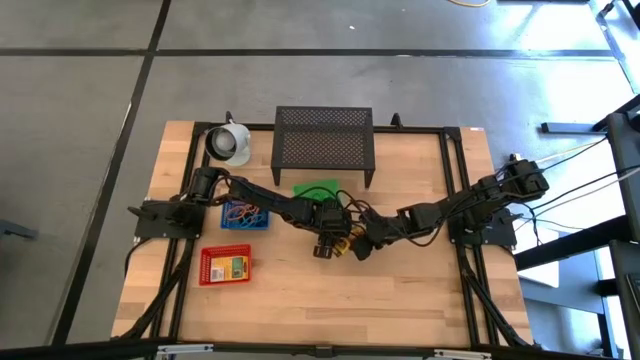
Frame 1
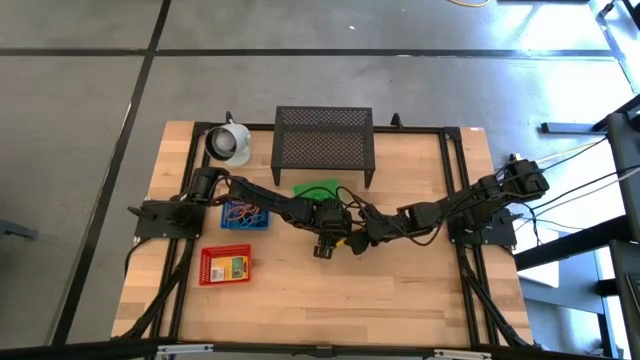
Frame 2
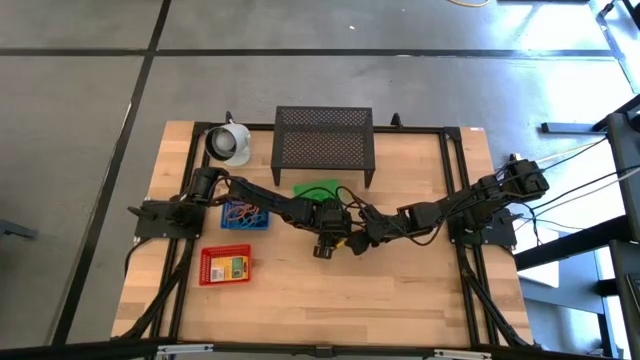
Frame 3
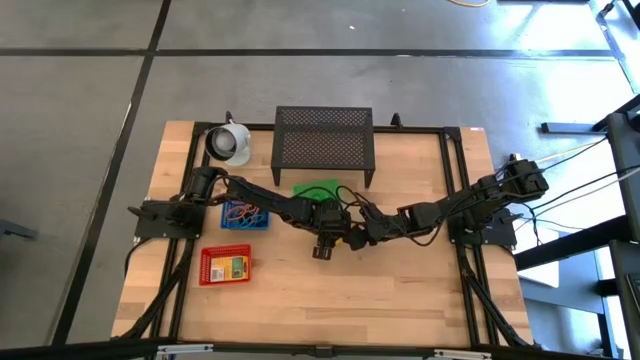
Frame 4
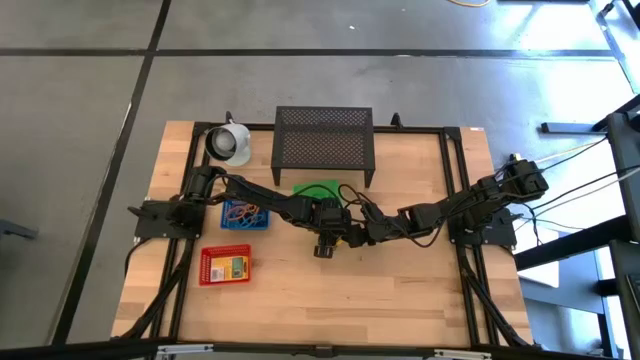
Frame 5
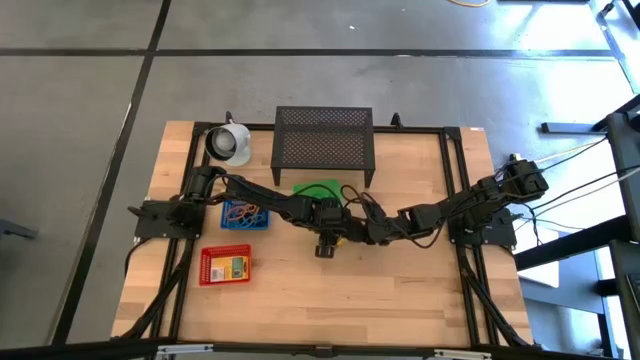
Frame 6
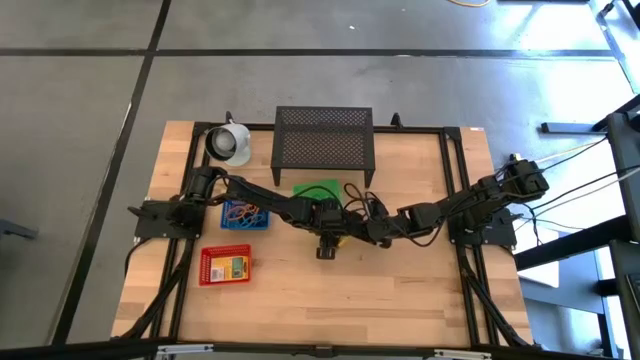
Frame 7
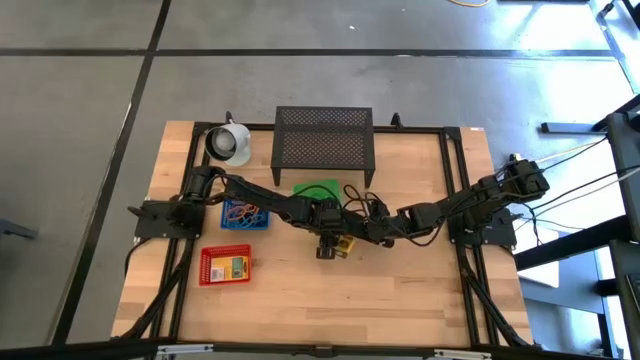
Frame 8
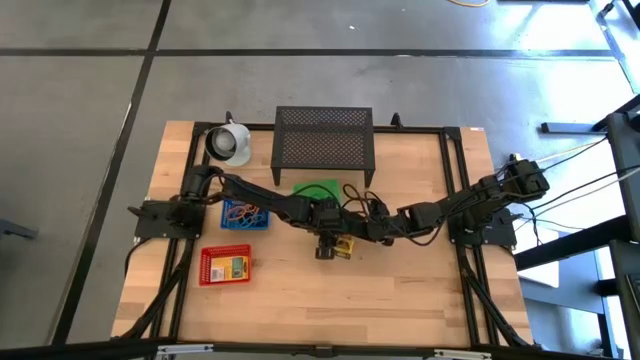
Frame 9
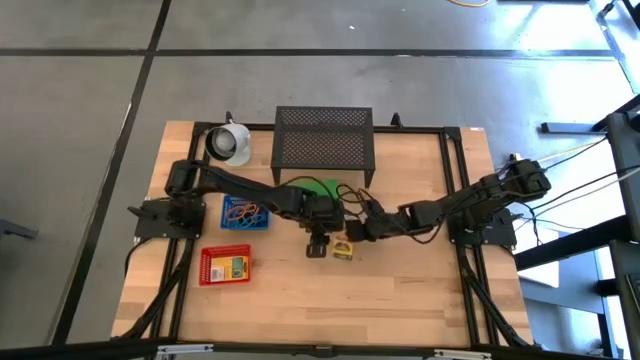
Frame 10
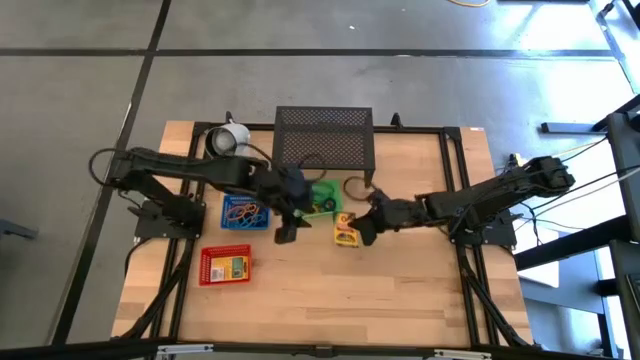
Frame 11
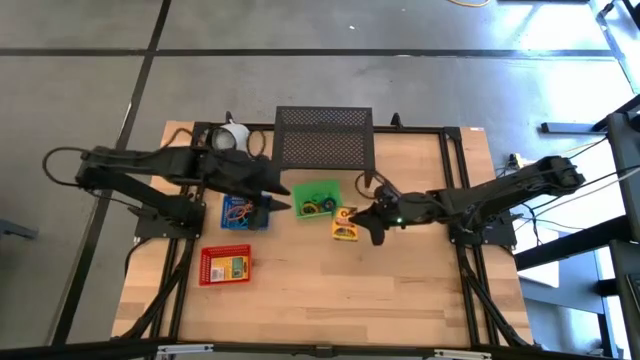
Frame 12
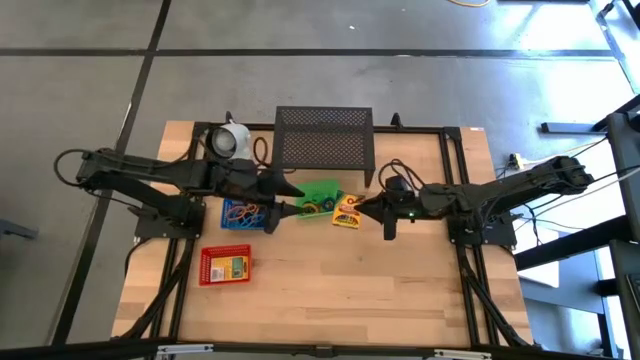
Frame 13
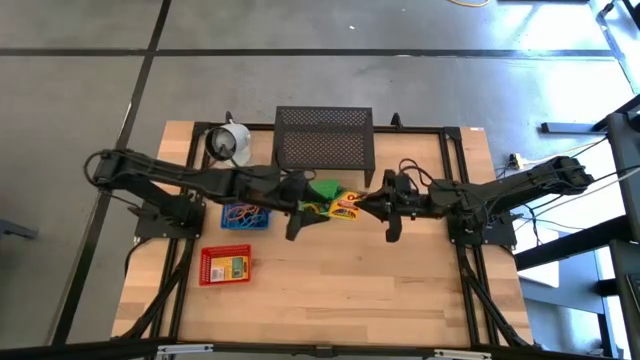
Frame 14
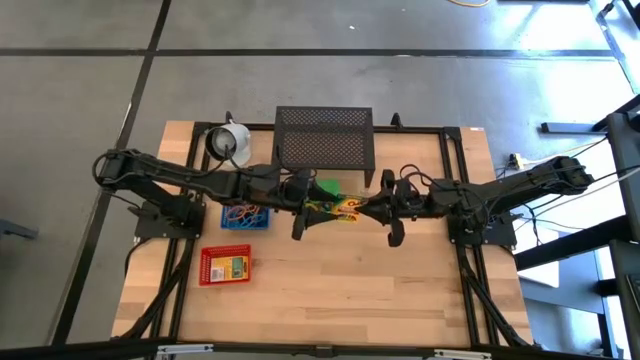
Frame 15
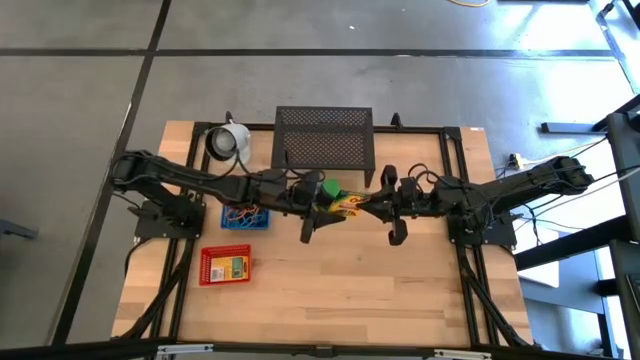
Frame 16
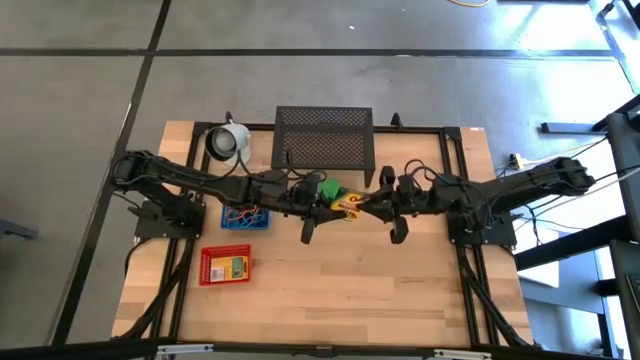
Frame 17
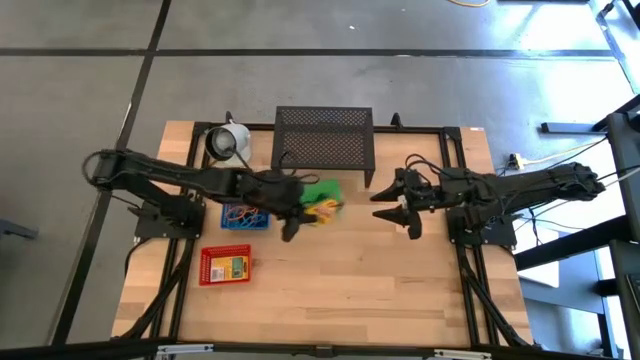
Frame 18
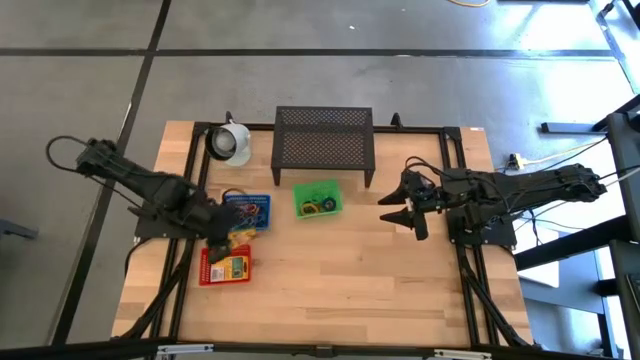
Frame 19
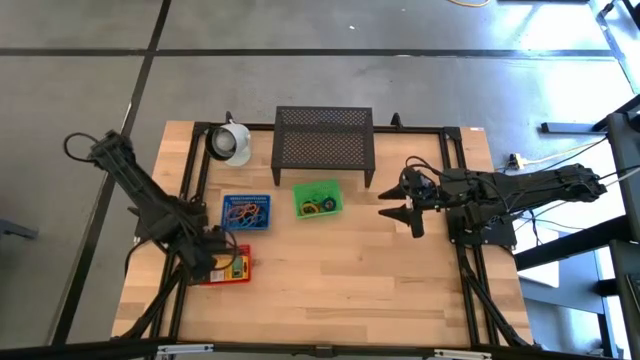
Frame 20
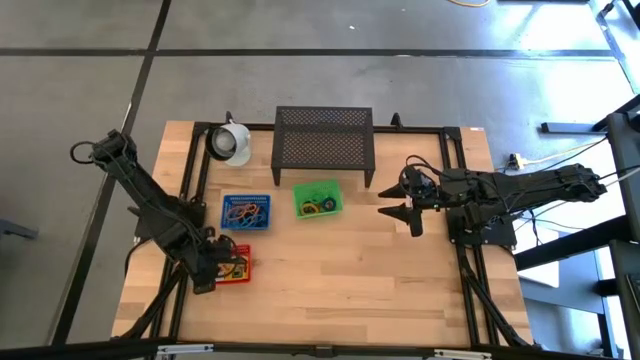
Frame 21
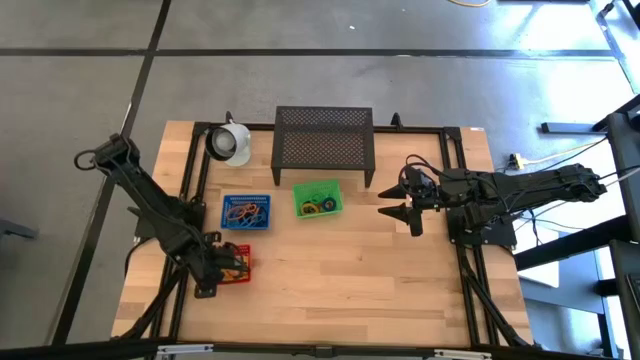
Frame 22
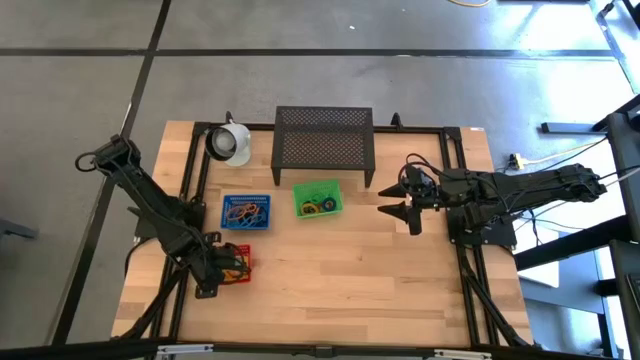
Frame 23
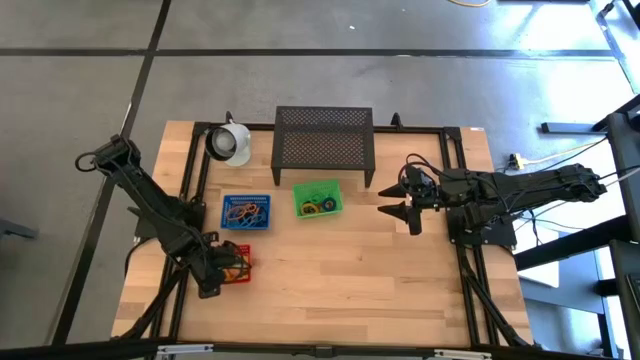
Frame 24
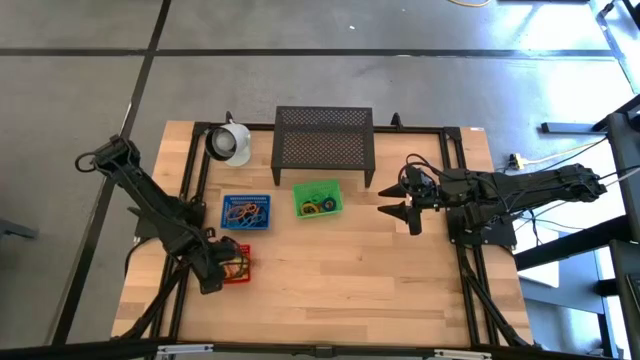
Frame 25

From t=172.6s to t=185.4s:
Task: Pick & Place Office Desk Supplies
Put the yellow box of crayon into the red bin

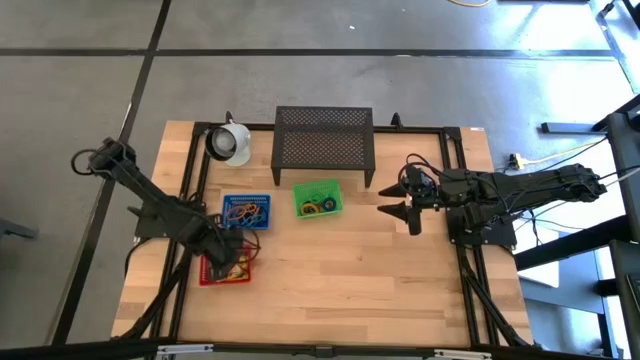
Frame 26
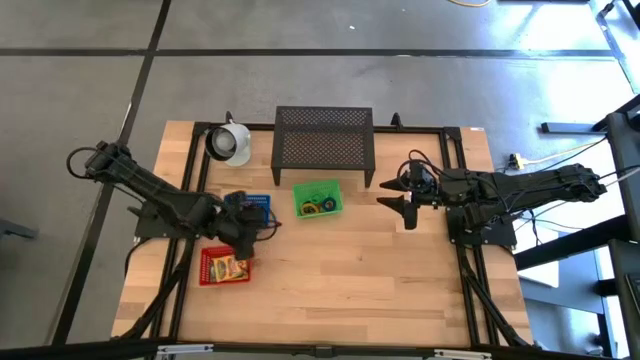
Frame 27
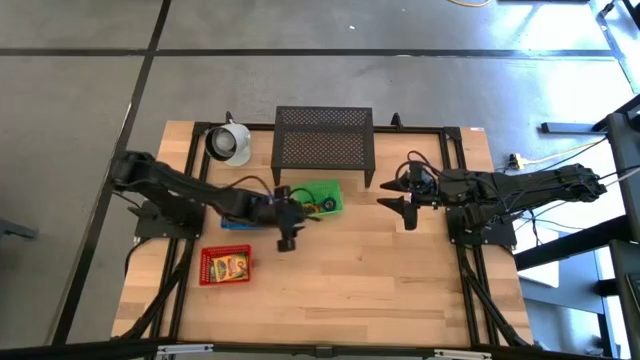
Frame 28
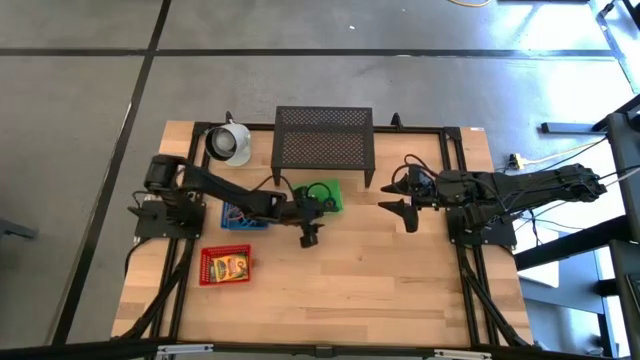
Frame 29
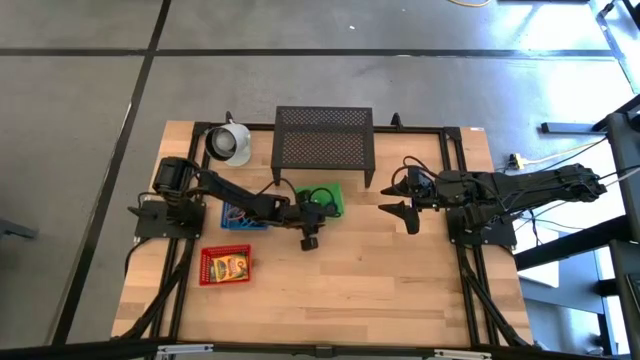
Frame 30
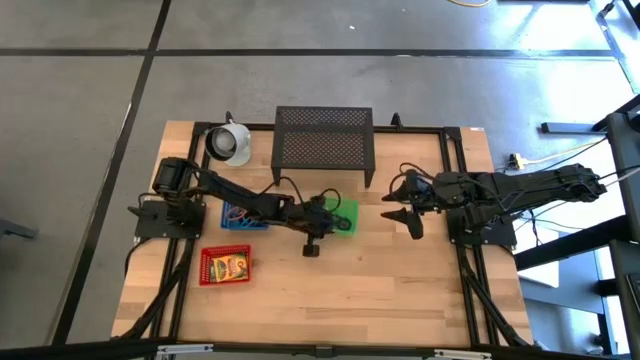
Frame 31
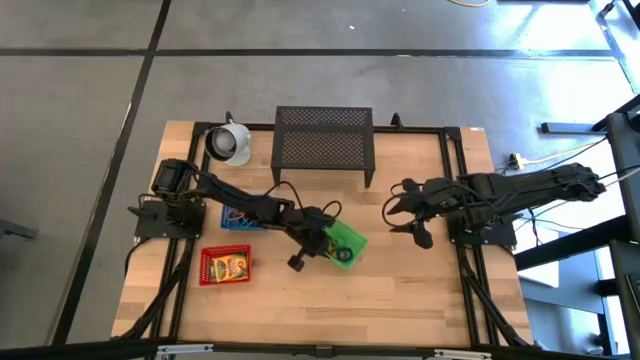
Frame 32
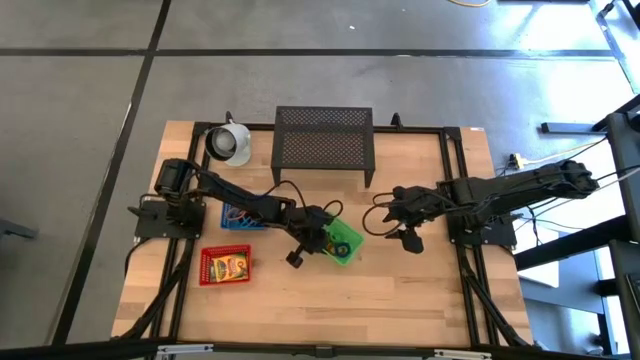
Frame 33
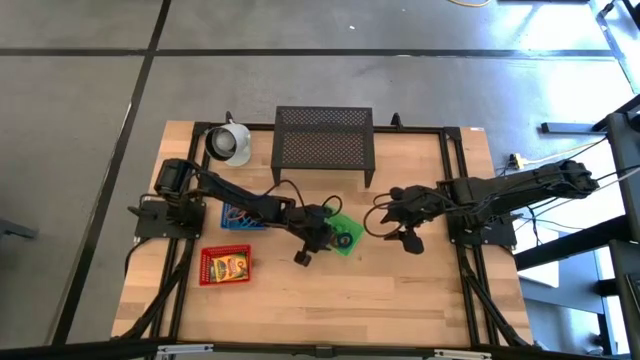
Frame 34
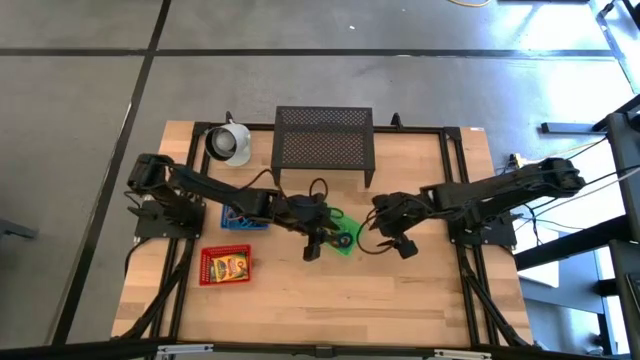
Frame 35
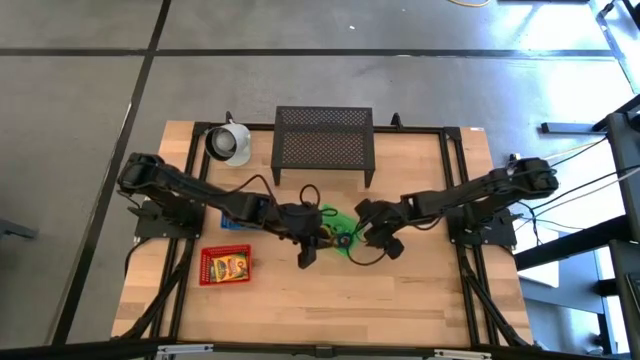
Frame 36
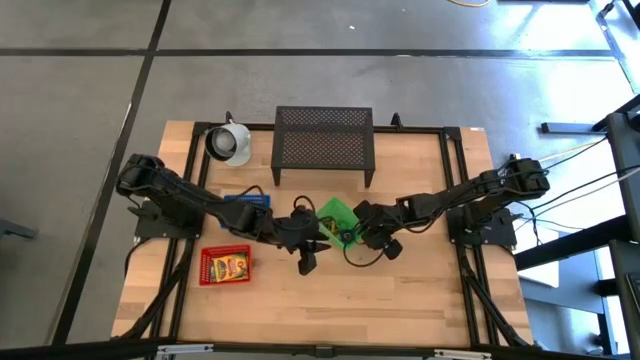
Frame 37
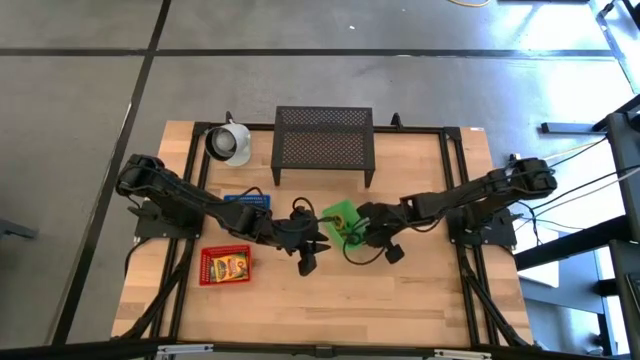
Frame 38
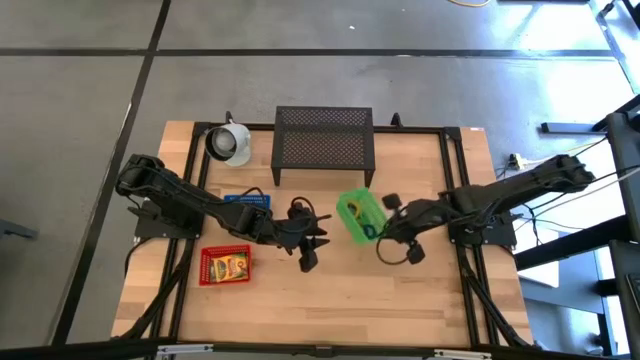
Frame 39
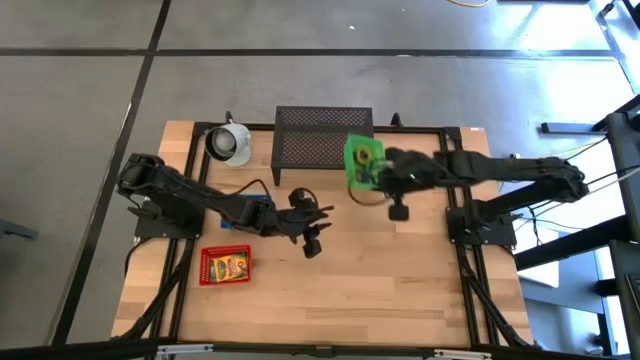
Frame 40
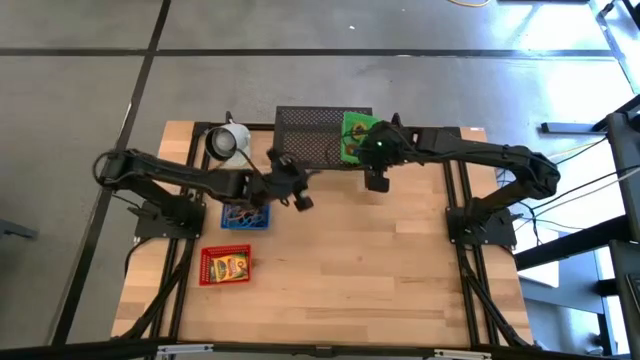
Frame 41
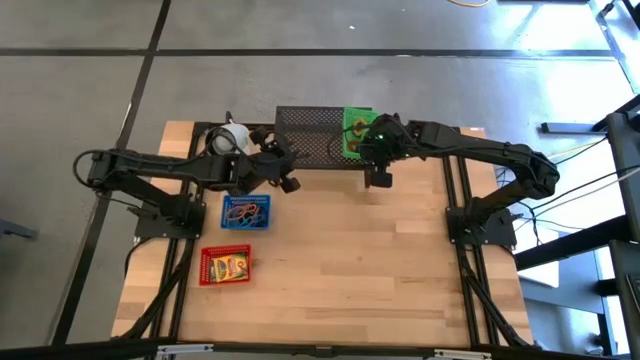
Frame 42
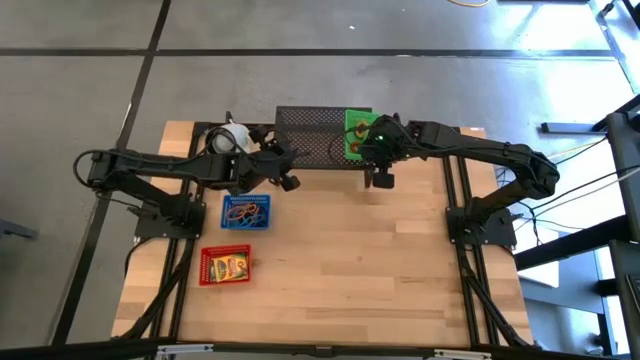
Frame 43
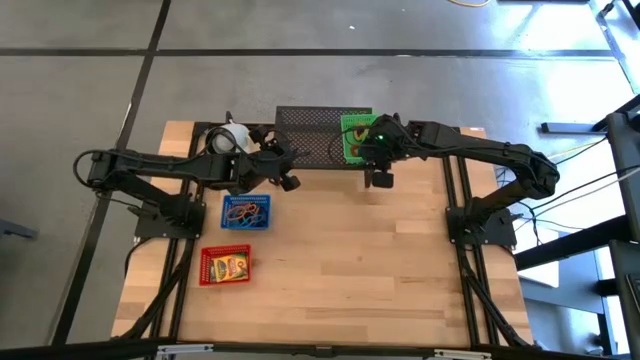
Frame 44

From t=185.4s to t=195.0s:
Put the green bin on the shelf

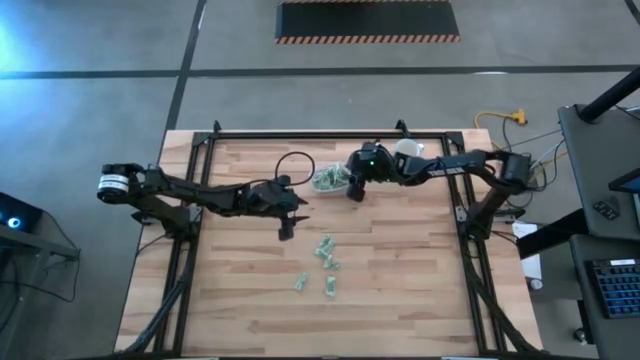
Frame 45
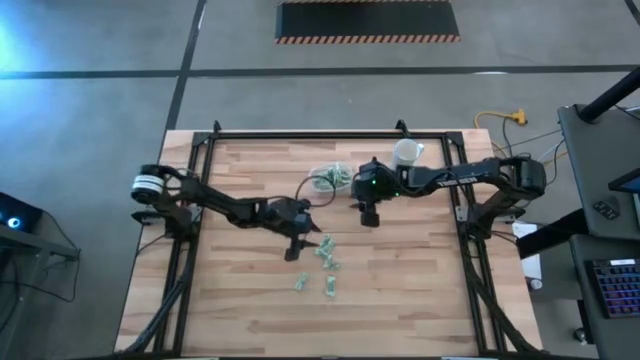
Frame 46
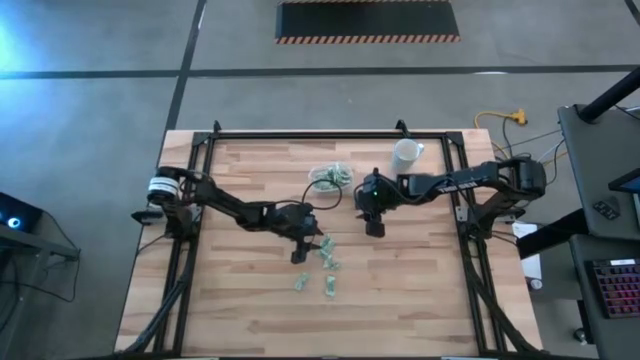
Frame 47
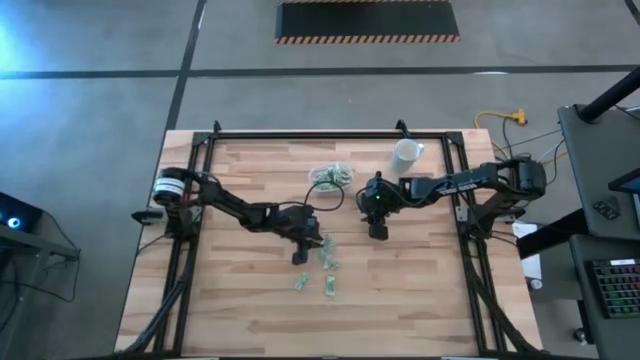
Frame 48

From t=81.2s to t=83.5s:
Task: Pick and place Stevia / Truvia into bins
Put the stevia packet into the transparent container
